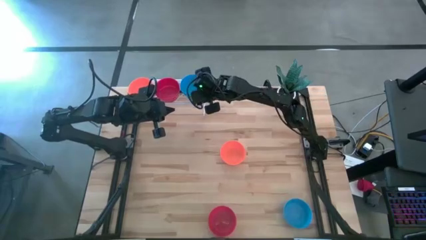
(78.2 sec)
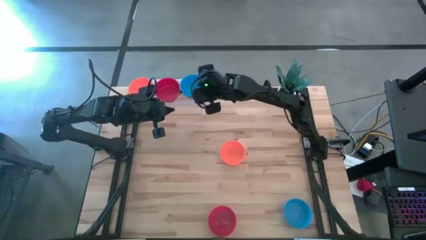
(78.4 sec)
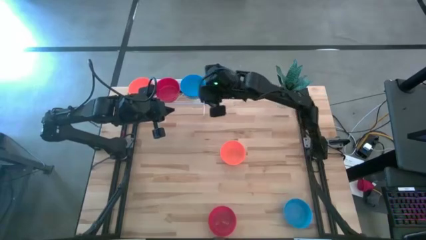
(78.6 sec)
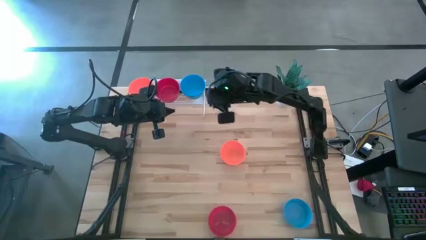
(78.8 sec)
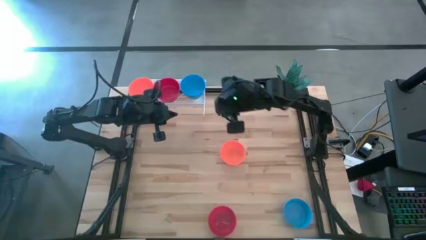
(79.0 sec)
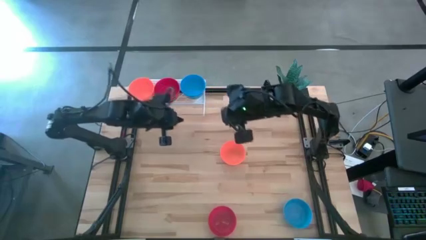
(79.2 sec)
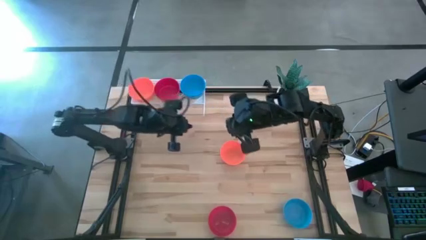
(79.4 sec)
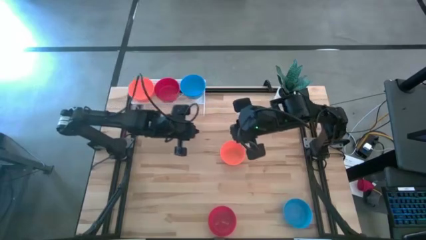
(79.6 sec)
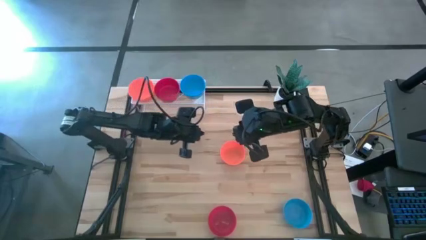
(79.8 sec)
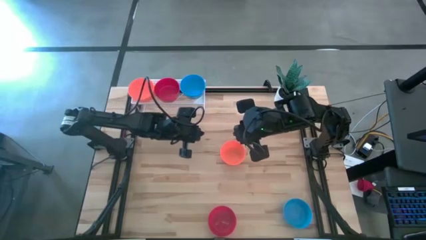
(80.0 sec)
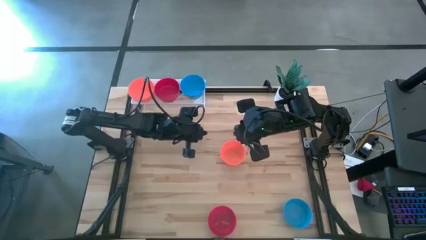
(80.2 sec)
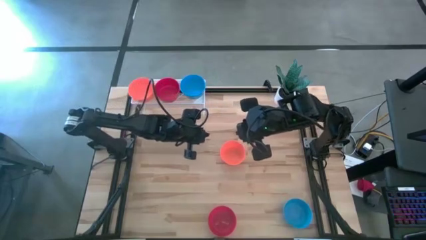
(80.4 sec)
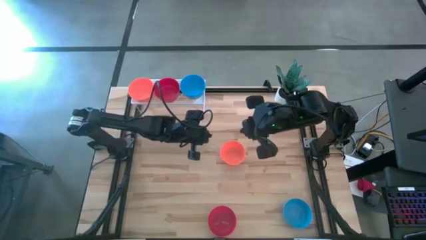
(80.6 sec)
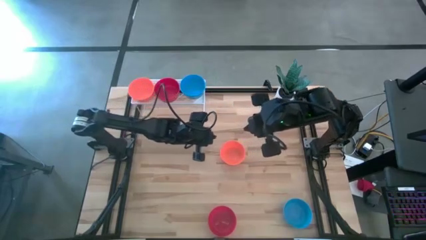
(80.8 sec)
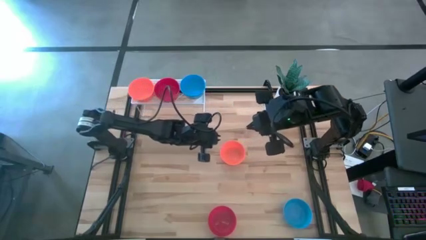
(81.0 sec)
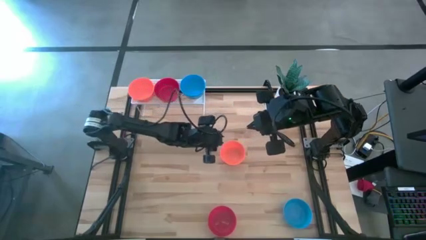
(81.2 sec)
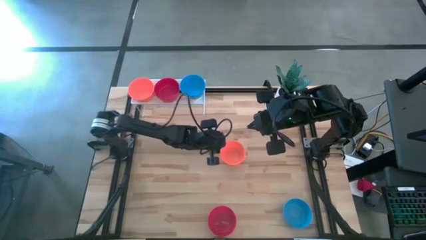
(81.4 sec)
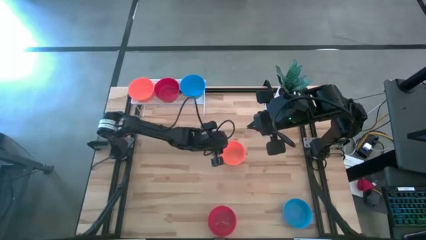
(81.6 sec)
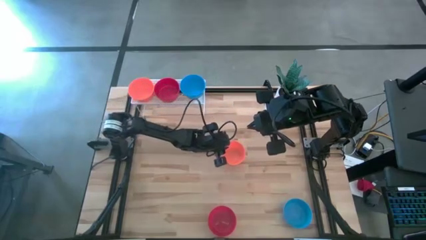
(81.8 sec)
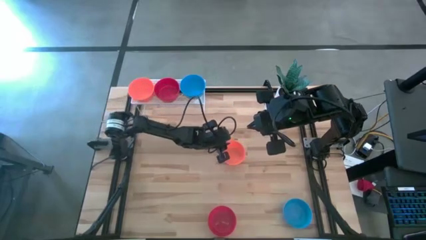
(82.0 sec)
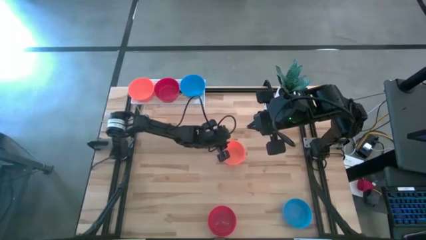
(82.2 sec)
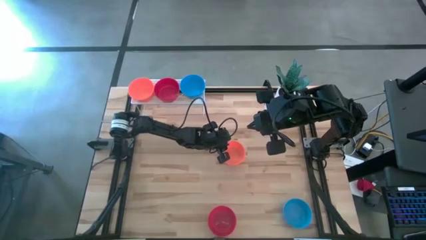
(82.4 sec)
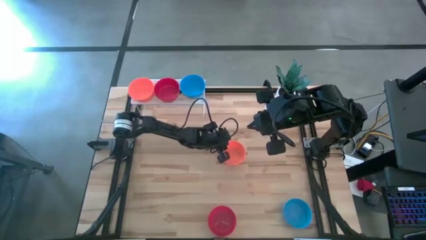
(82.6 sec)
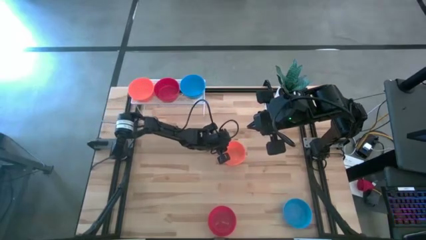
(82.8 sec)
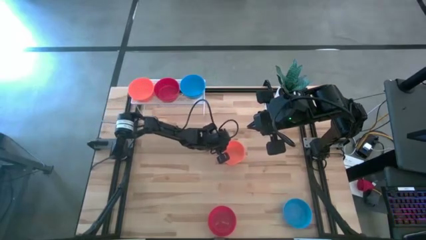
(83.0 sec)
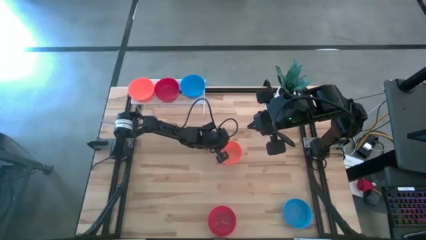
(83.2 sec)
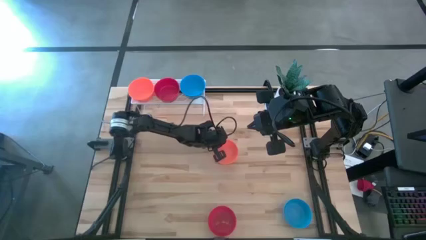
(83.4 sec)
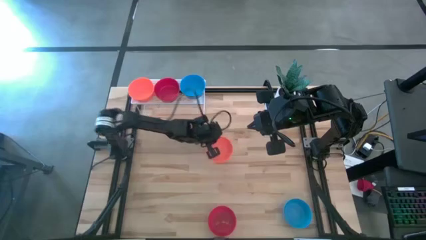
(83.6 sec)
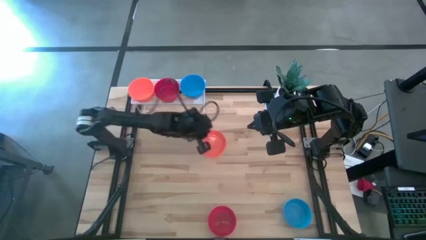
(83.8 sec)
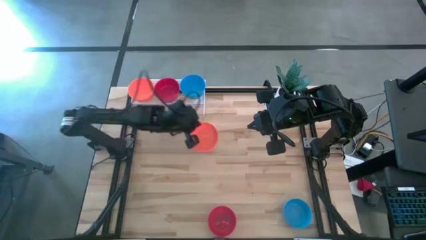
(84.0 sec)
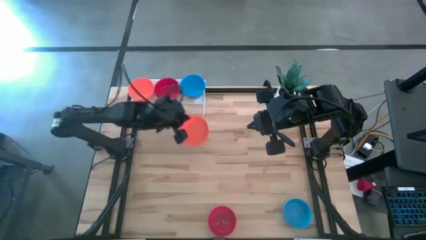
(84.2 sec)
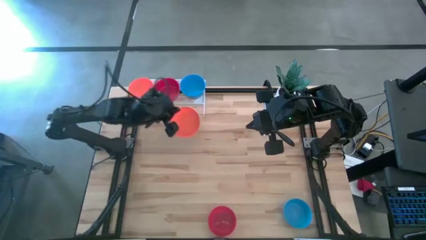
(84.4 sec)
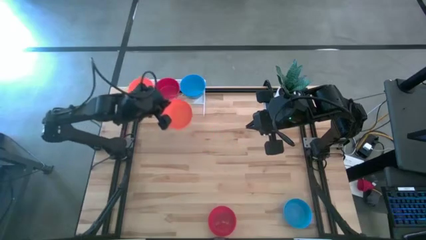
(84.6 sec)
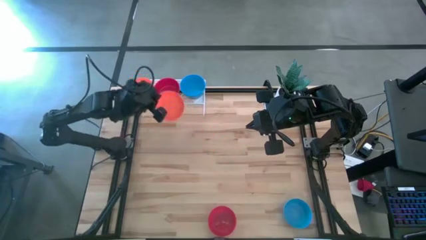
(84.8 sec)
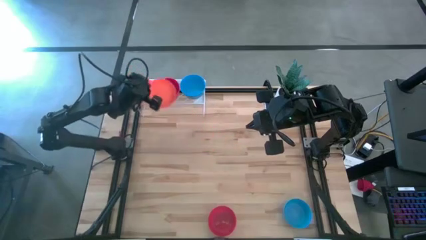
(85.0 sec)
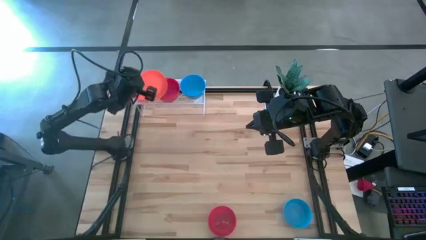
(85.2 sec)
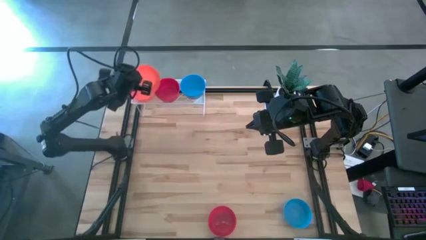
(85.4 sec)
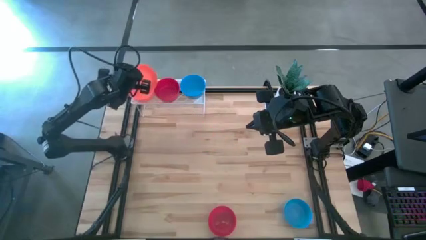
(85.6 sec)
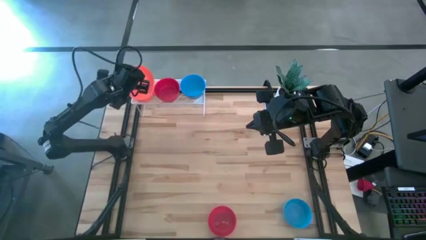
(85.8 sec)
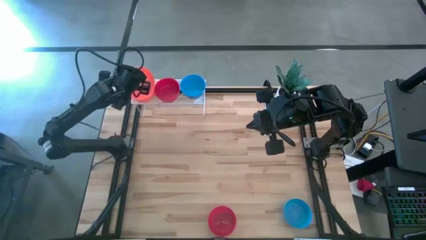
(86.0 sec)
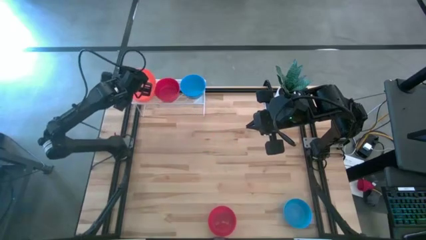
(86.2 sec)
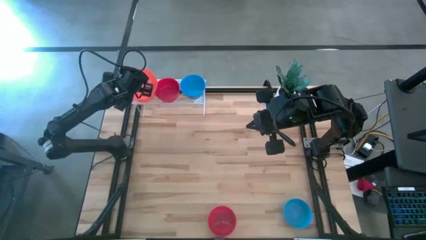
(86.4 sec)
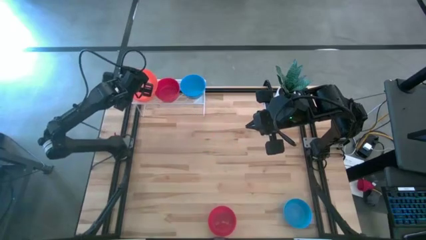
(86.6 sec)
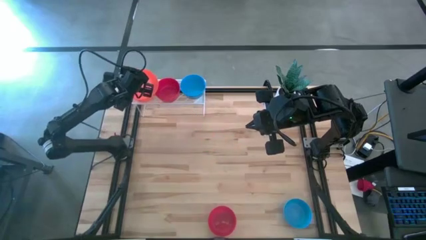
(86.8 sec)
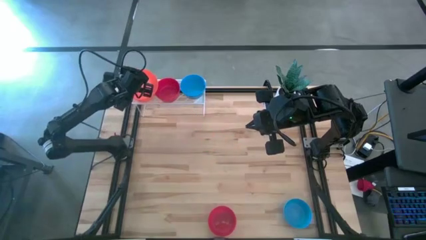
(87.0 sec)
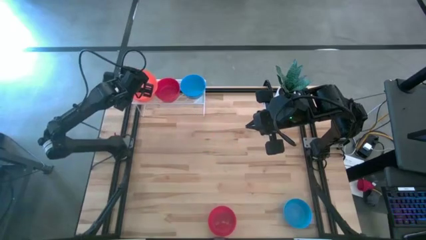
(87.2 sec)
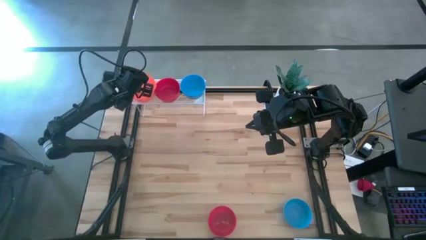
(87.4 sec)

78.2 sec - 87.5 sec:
Task: Pick & Place Mini bowls
Stack the orange bowl on top of the orange bowl on the shelf

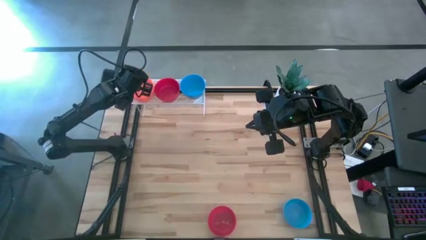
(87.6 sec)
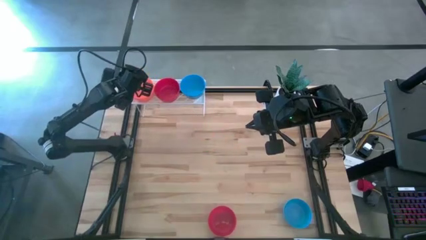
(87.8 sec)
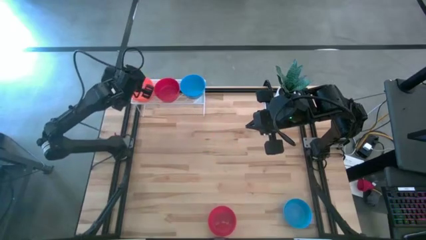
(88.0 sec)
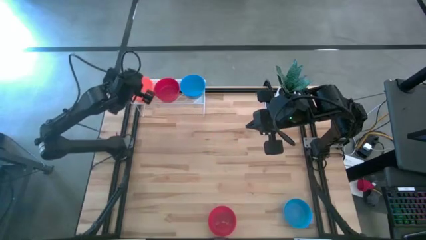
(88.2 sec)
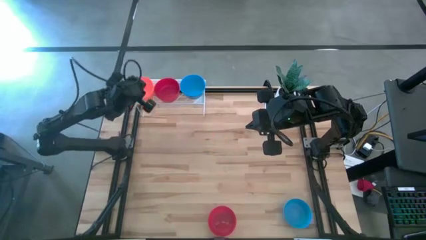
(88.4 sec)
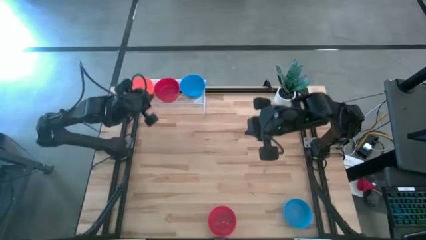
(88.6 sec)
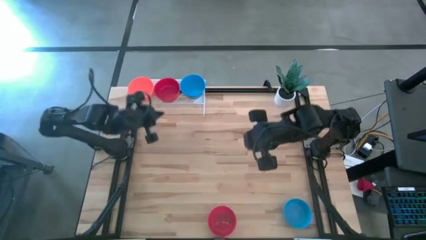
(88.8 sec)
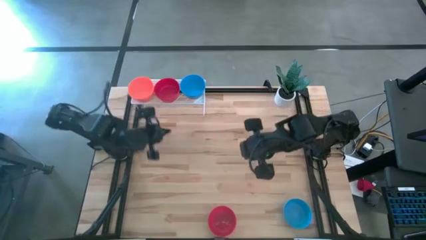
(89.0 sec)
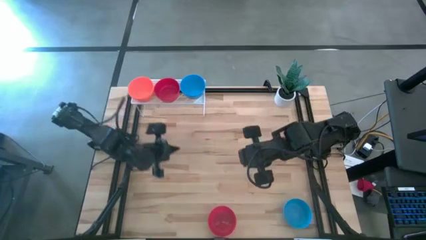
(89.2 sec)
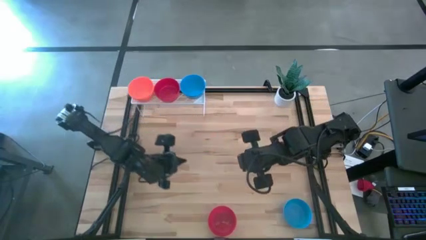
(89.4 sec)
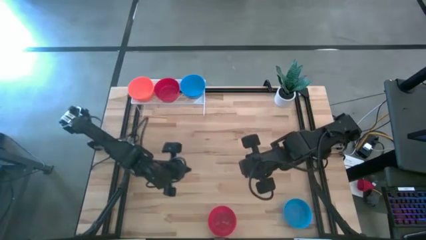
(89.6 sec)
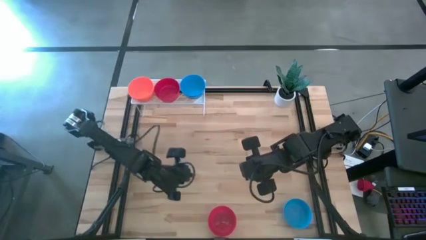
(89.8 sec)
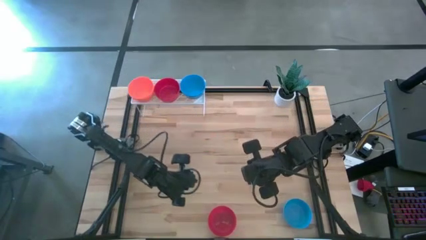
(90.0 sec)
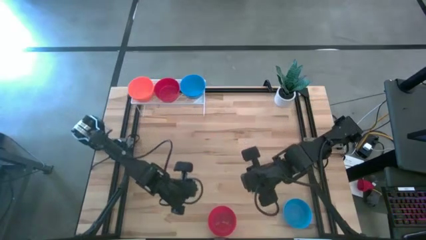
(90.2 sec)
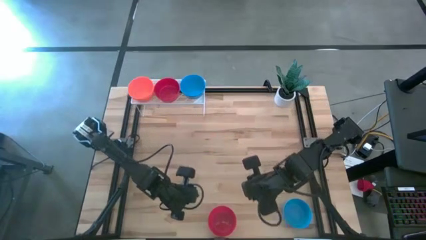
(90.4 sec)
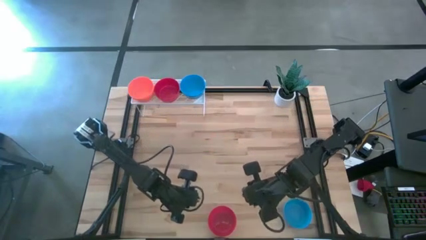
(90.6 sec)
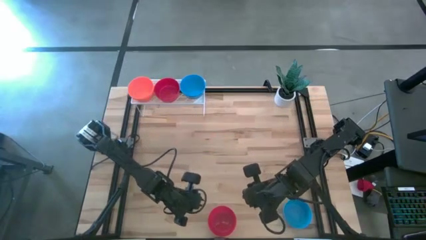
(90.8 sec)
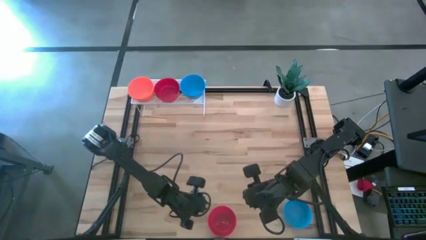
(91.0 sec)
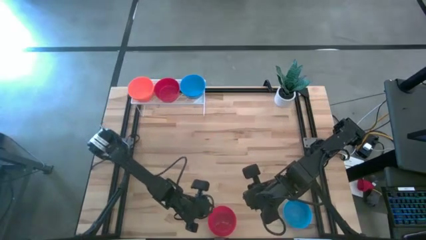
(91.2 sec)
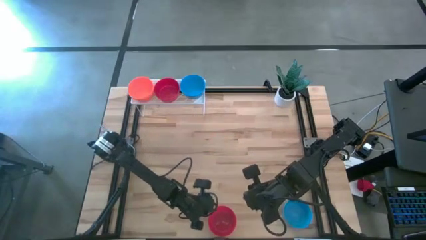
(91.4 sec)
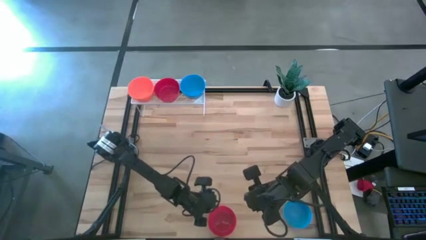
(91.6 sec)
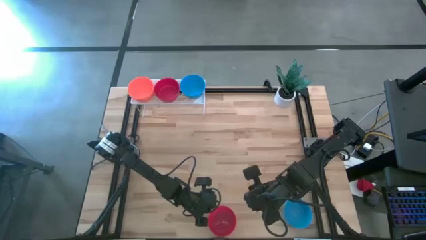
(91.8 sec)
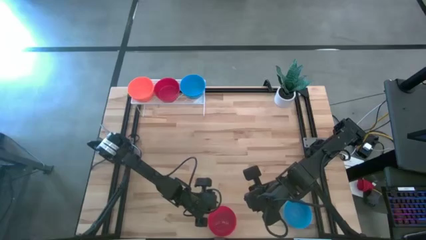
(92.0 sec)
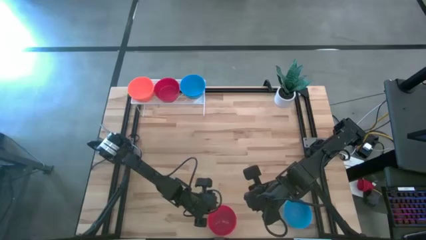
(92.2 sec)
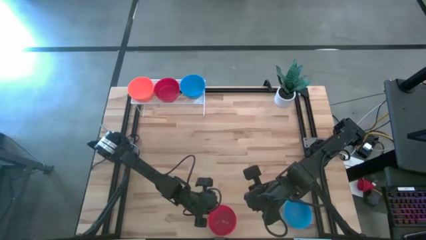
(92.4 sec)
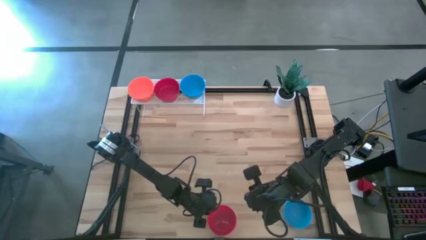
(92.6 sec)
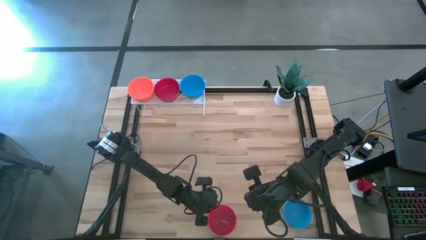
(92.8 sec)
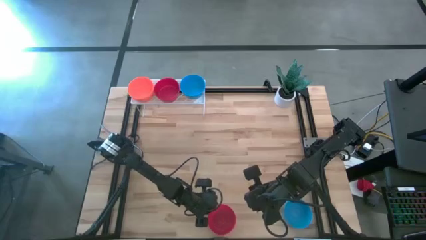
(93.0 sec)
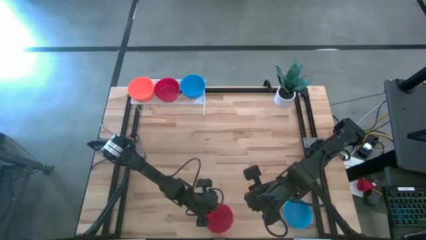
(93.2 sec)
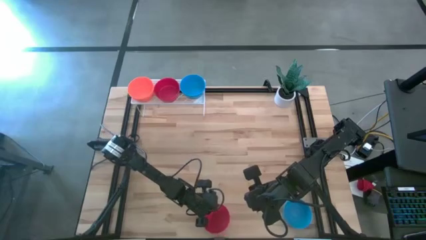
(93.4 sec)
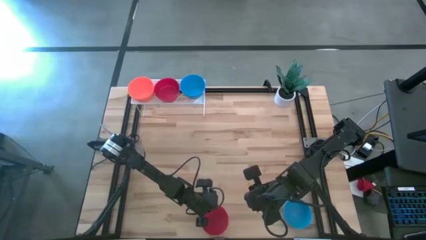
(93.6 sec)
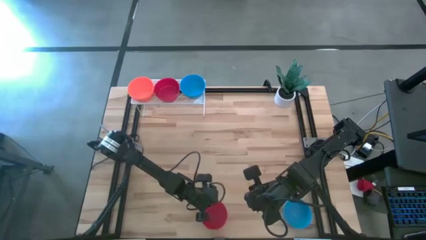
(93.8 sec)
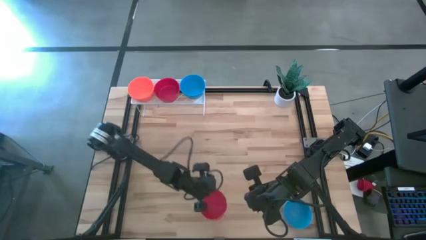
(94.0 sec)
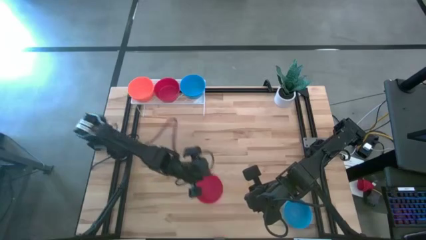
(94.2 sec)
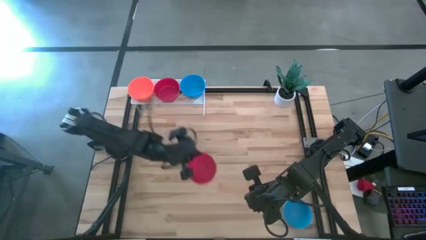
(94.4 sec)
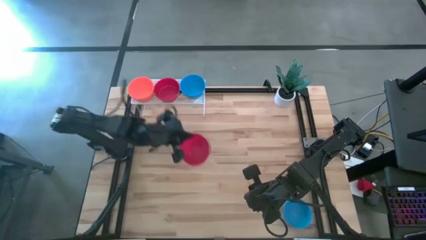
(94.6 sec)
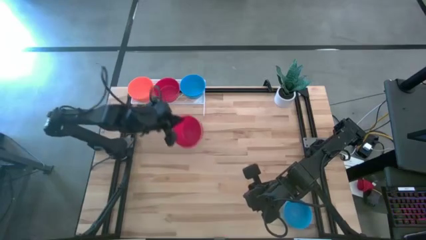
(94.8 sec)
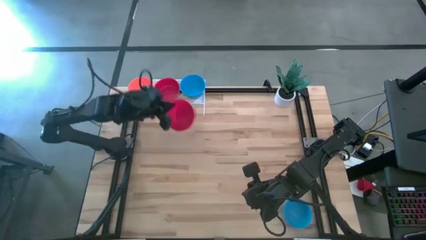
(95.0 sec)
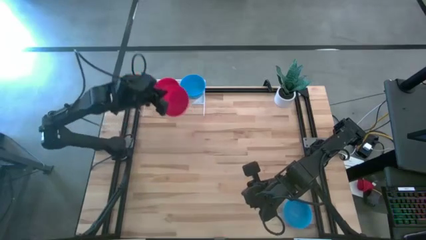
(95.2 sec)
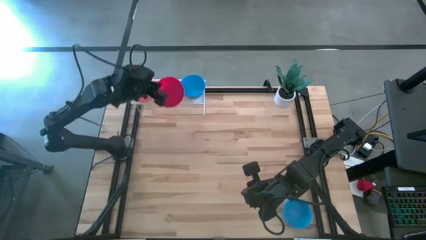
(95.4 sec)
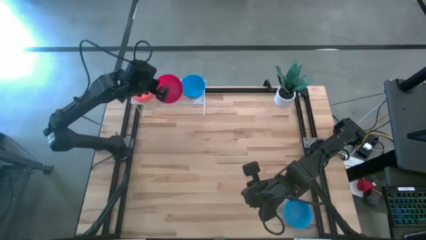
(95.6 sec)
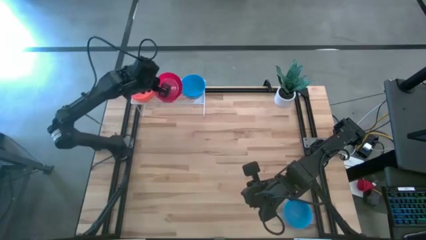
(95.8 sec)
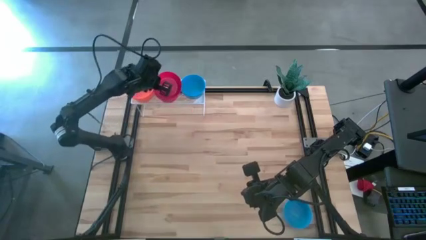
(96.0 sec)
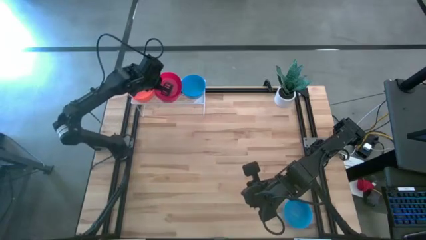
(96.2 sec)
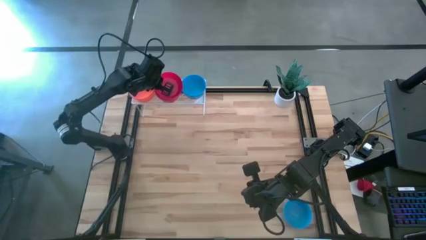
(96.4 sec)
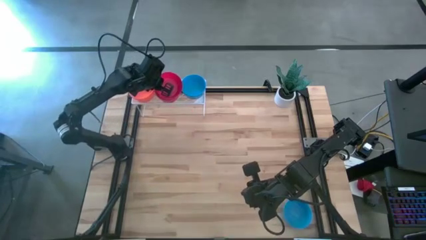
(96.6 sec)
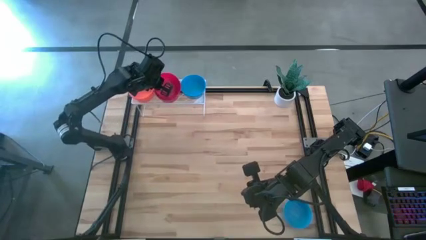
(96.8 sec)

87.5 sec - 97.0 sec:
Stack the red bowl on top of the red bowl on the shelf
